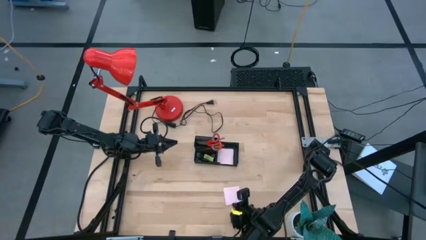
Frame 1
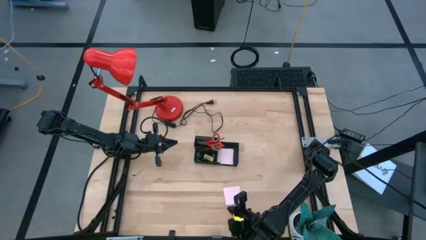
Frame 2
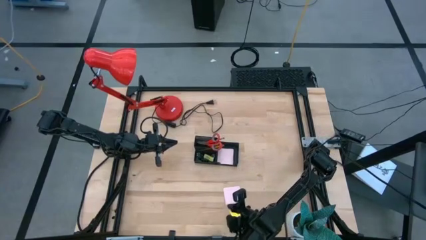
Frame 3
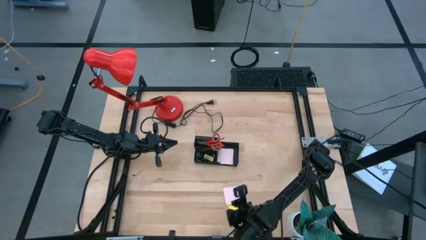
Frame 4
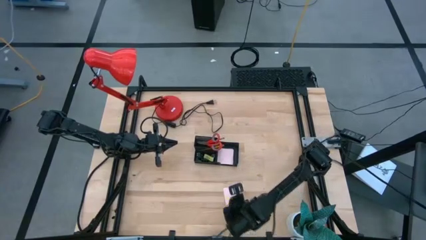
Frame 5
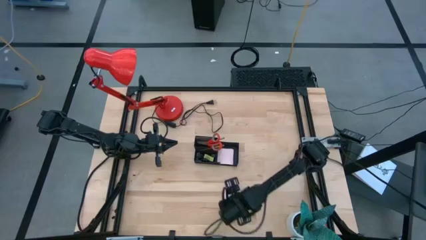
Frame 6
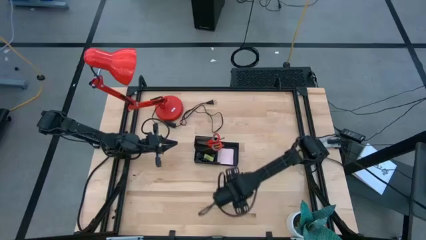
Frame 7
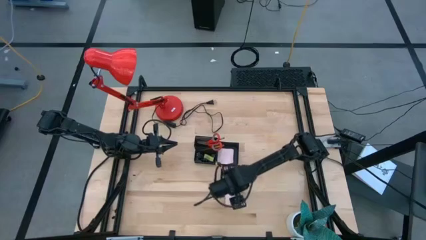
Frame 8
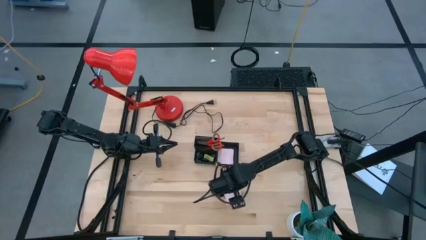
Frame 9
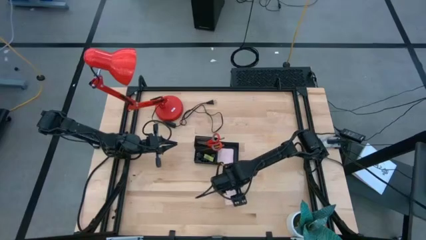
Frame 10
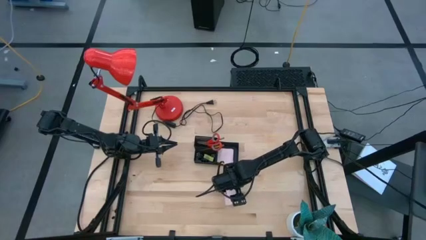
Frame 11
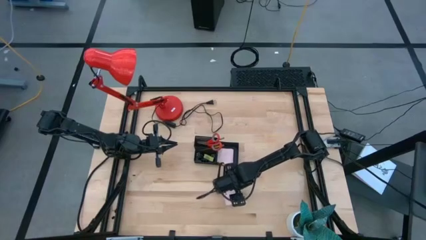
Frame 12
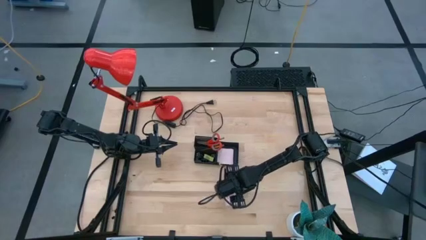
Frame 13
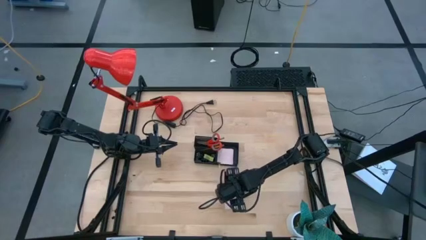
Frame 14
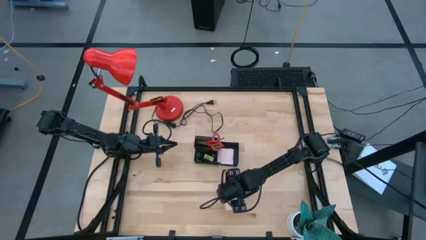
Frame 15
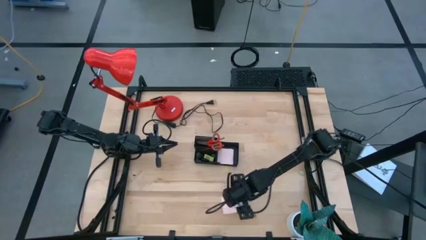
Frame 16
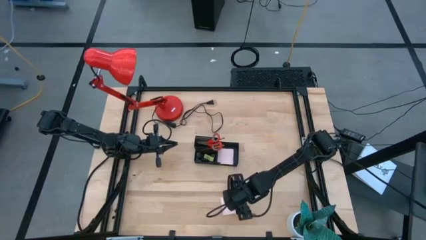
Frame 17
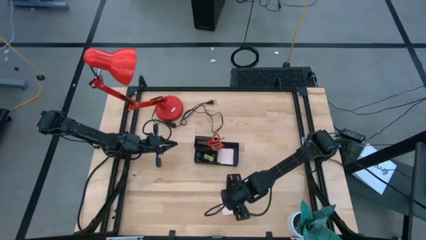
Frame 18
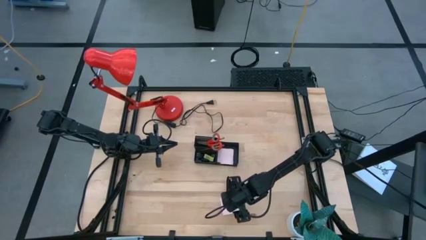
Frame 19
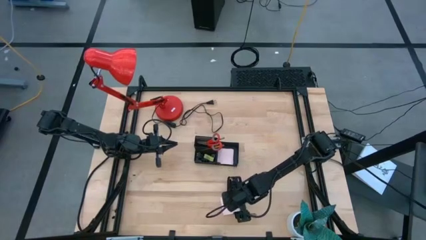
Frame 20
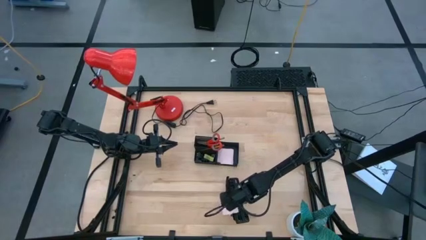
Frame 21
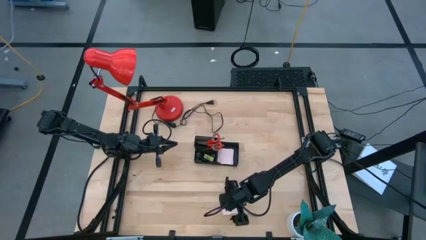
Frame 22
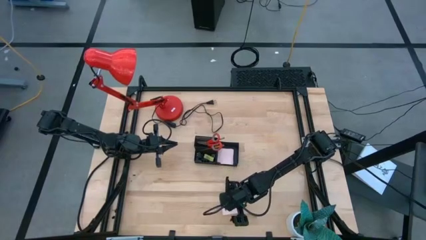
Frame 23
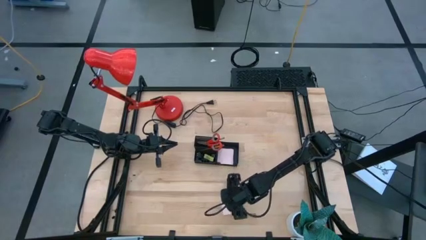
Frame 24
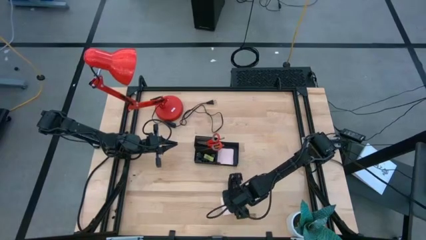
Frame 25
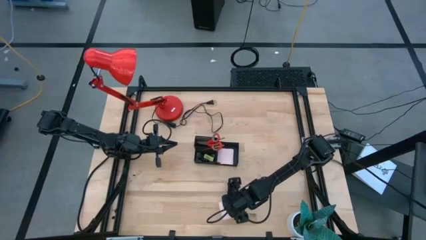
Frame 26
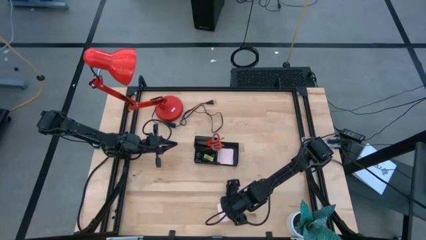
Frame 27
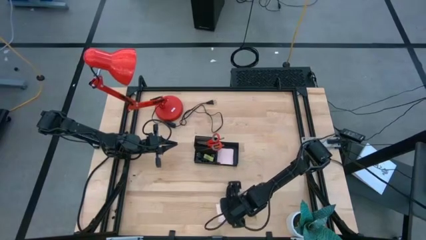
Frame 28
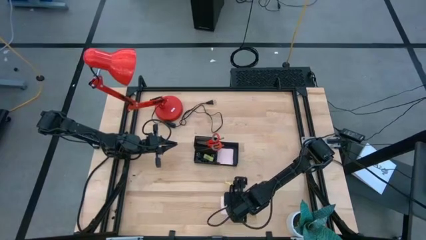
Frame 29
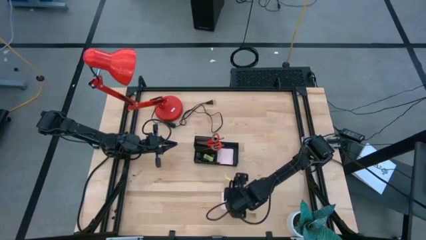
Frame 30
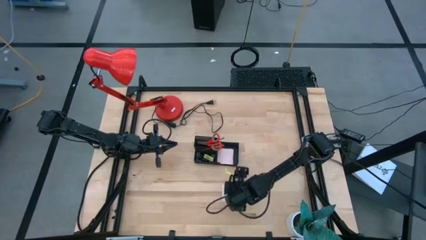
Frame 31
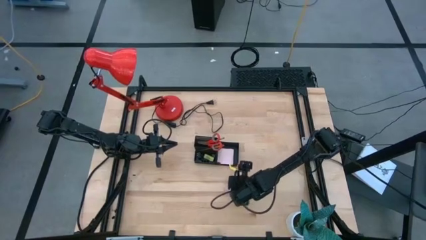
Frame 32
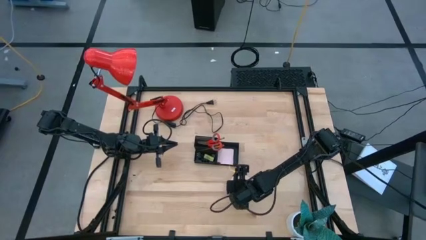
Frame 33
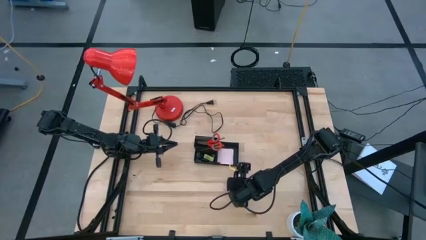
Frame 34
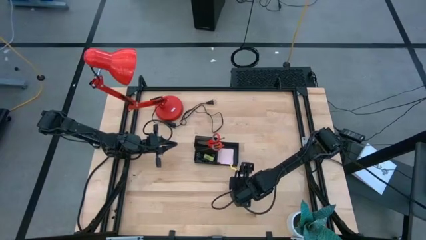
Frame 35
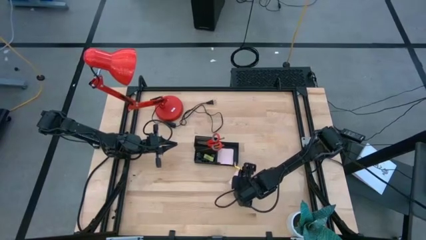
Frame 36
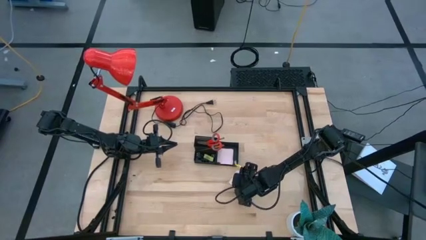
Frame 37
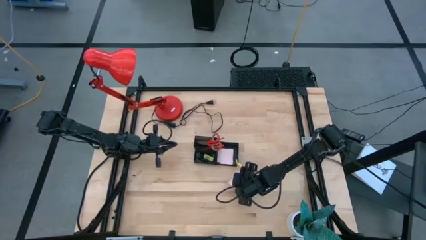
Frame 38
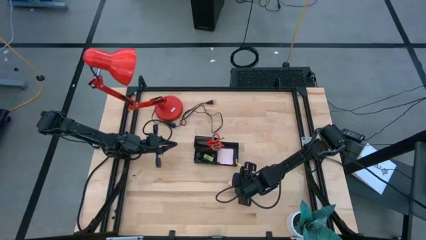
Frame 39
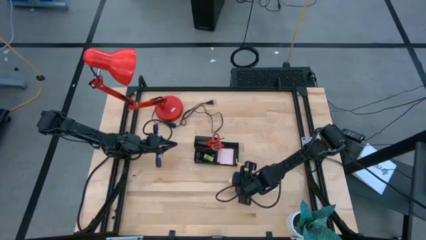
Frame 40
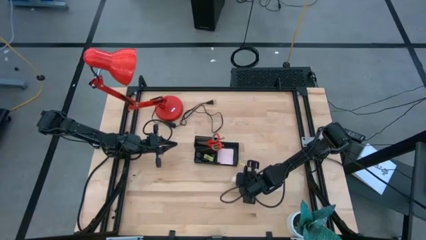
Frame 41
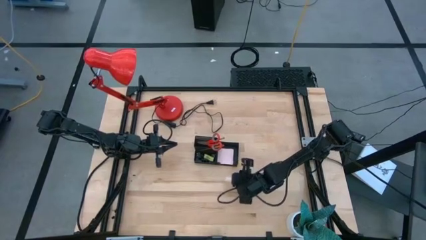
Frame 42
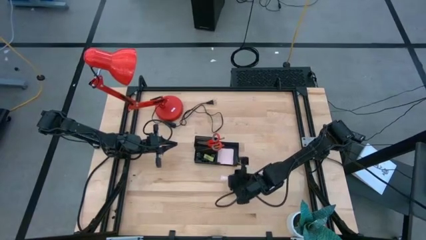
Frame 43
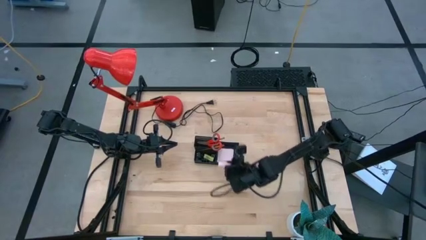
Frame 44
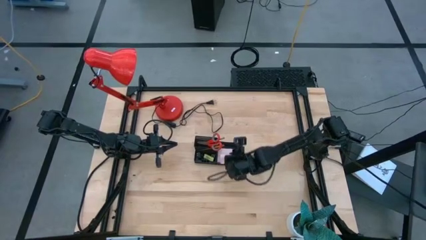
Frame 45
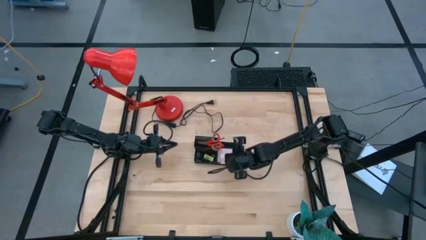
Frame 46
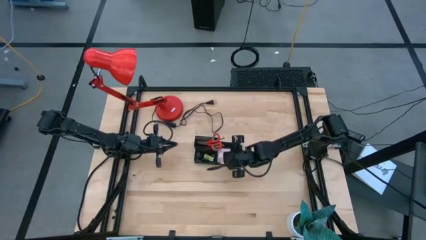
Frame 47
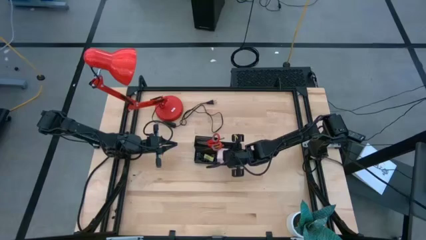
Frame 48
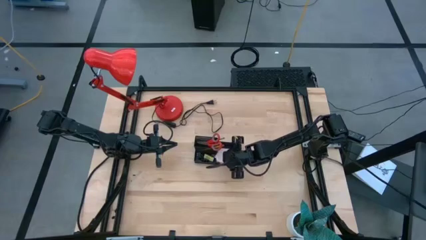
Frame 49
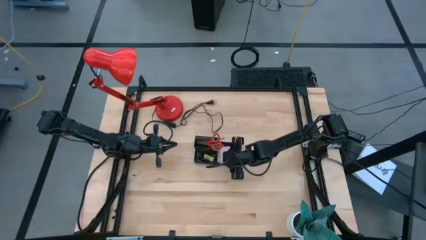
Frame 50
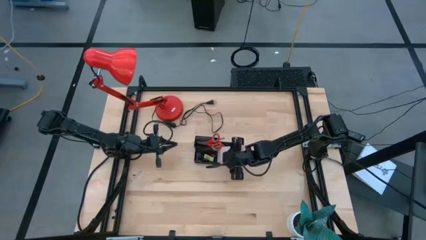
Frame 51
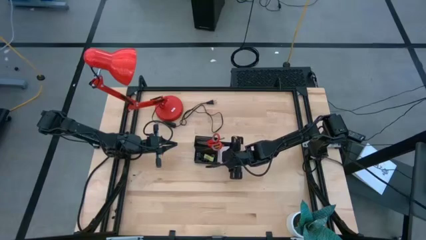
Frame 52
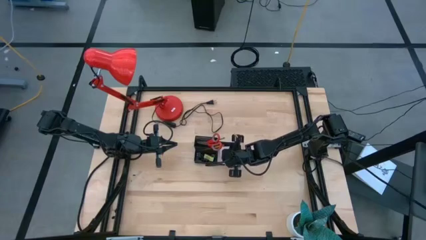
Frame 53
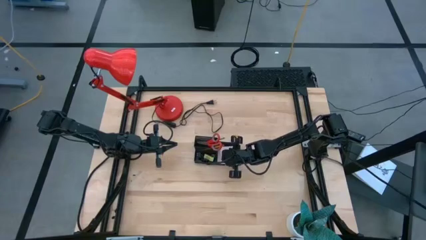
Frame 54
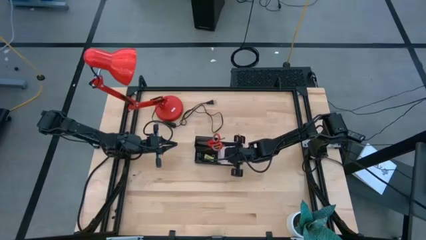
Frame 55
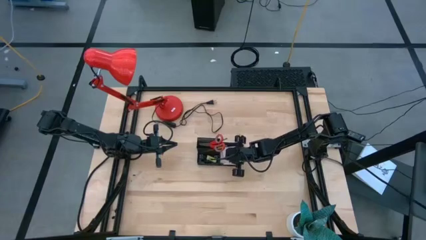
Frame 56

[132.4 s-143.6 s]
Task: Pick and place office supplies into organizer
Put the pink sticky notes into the desk organizer
